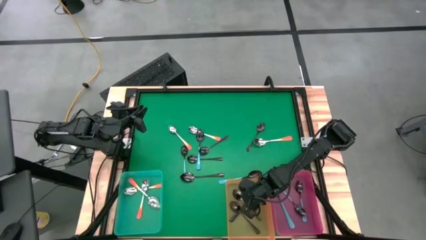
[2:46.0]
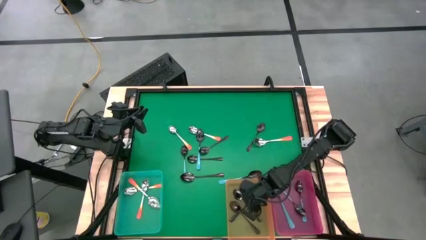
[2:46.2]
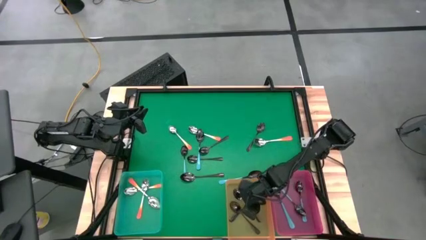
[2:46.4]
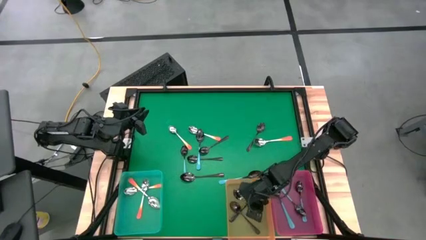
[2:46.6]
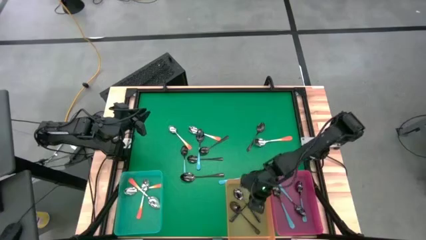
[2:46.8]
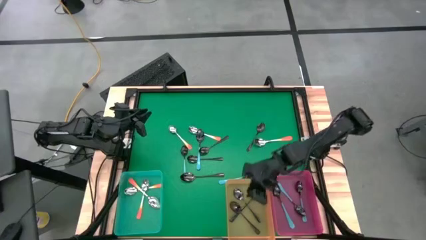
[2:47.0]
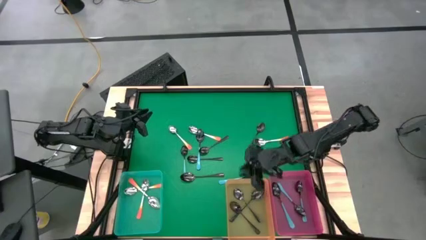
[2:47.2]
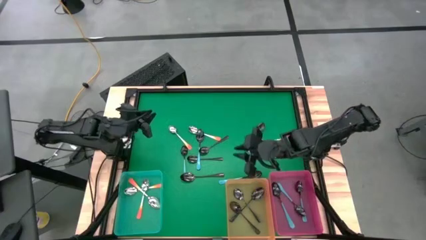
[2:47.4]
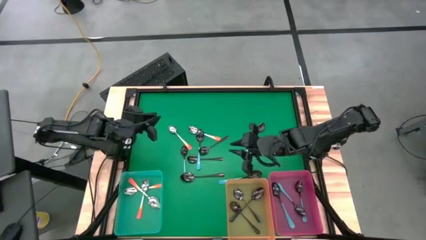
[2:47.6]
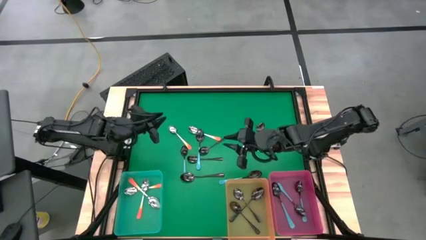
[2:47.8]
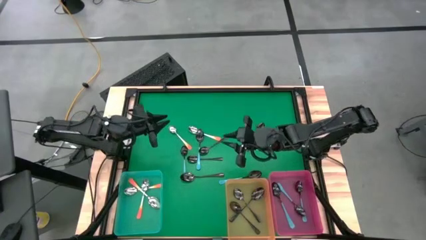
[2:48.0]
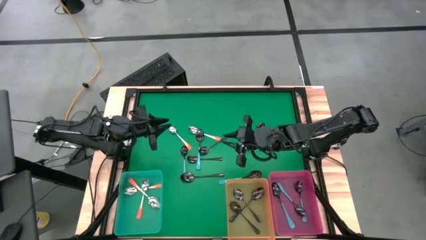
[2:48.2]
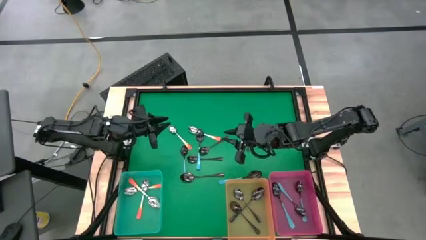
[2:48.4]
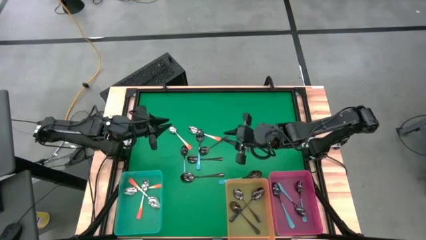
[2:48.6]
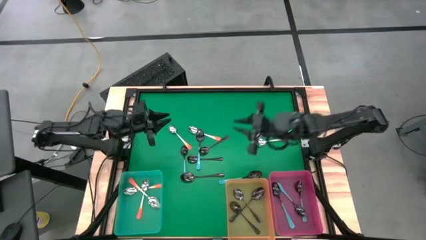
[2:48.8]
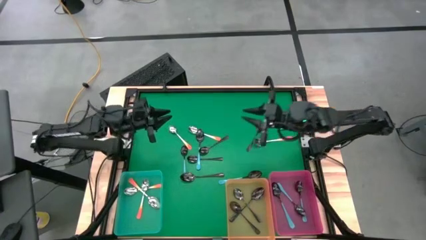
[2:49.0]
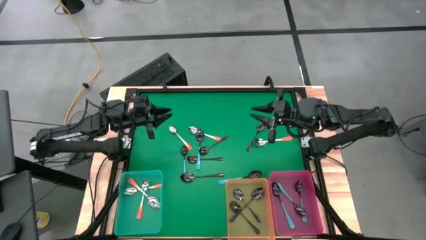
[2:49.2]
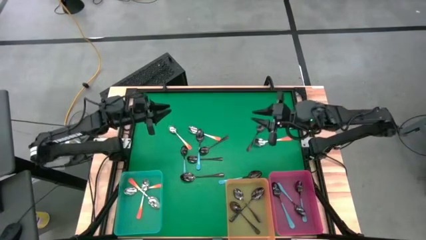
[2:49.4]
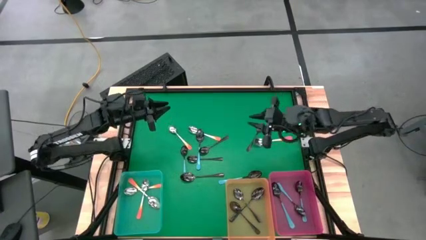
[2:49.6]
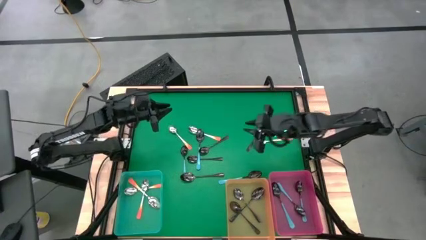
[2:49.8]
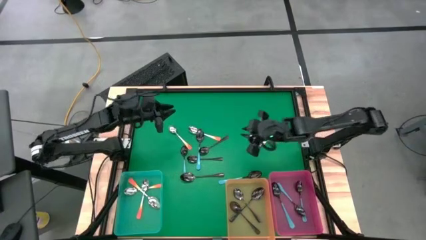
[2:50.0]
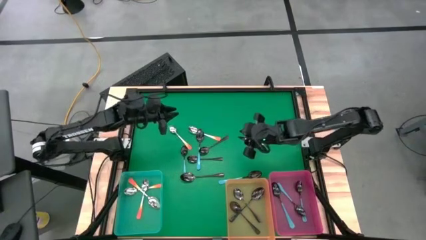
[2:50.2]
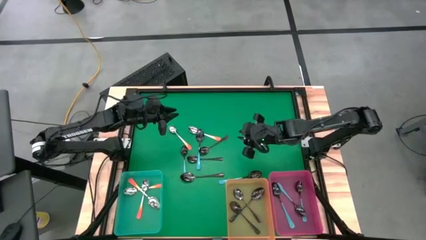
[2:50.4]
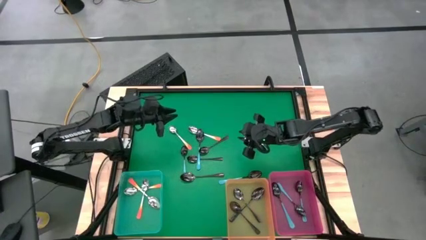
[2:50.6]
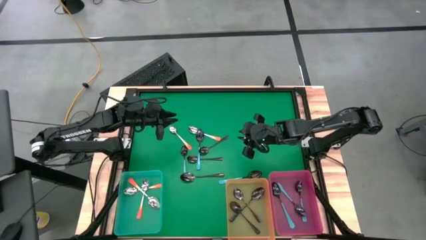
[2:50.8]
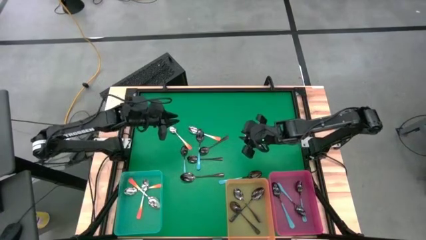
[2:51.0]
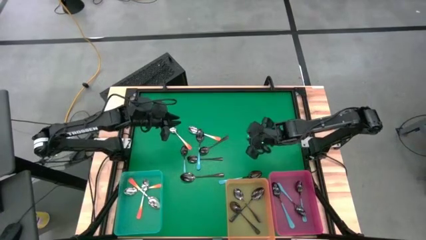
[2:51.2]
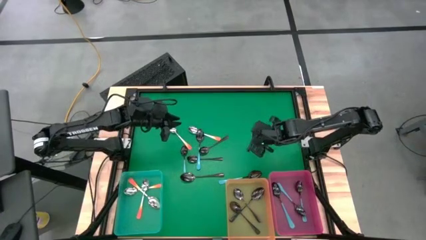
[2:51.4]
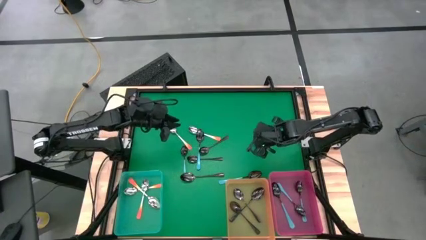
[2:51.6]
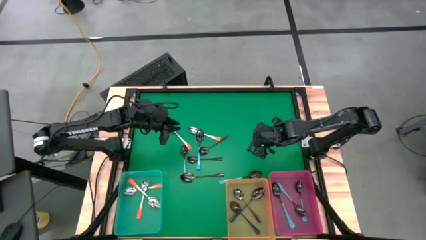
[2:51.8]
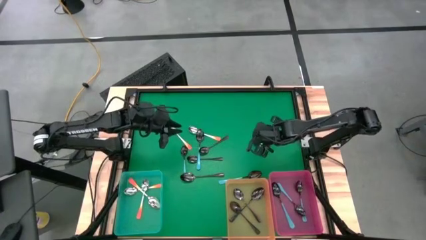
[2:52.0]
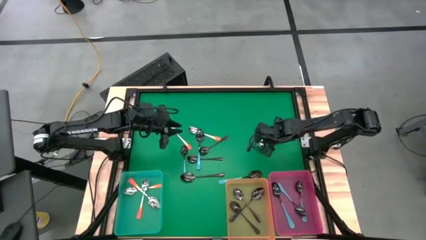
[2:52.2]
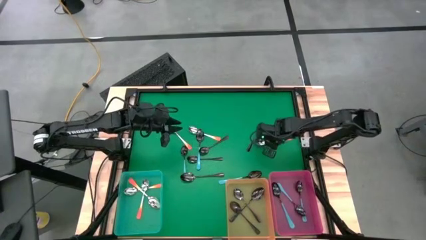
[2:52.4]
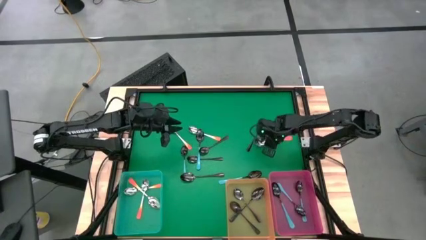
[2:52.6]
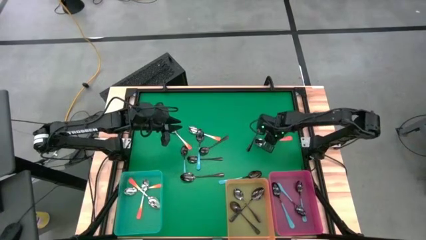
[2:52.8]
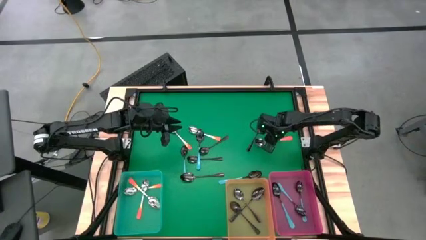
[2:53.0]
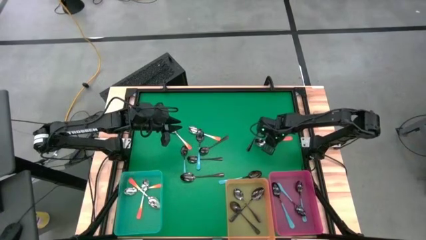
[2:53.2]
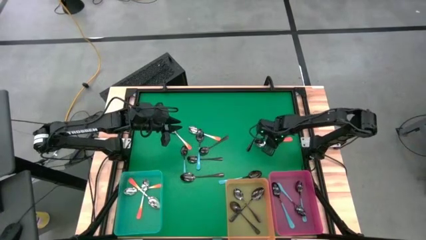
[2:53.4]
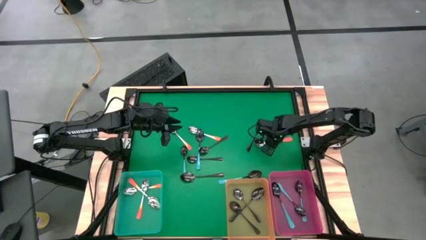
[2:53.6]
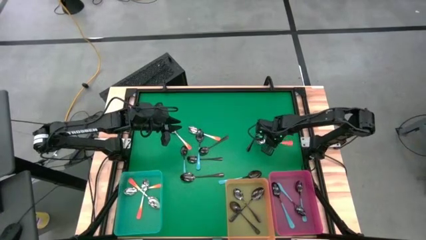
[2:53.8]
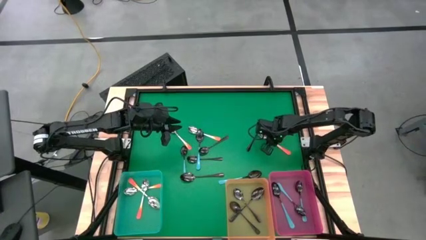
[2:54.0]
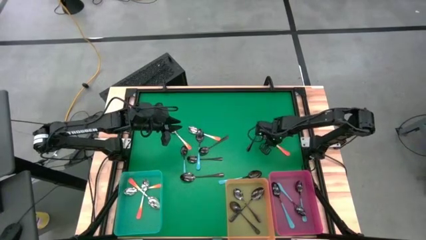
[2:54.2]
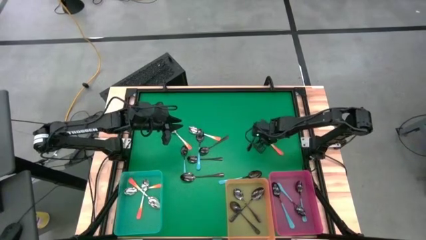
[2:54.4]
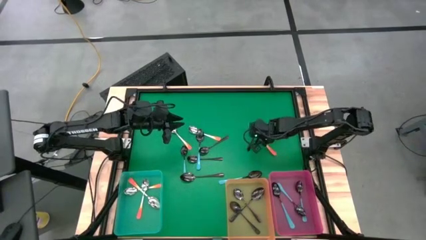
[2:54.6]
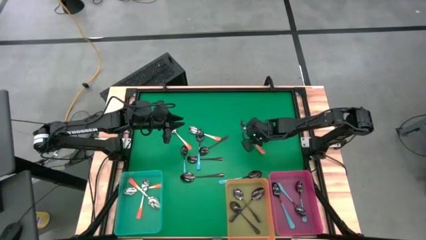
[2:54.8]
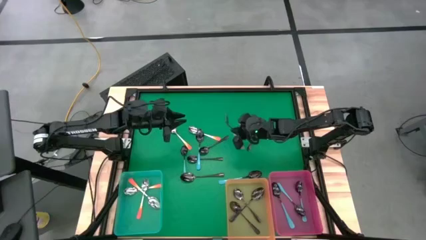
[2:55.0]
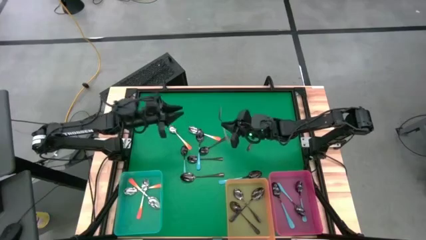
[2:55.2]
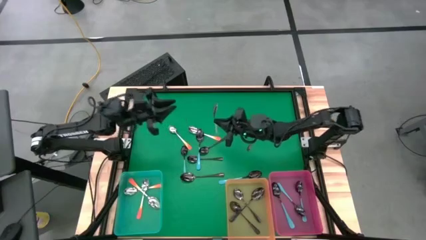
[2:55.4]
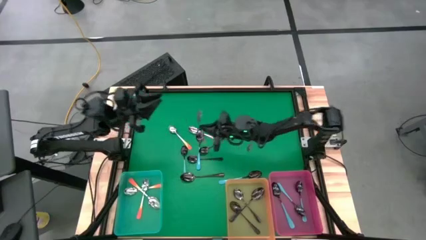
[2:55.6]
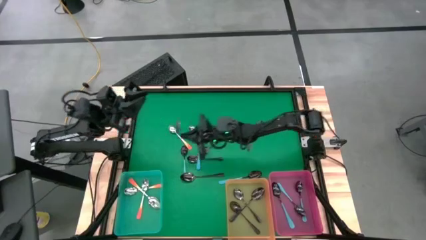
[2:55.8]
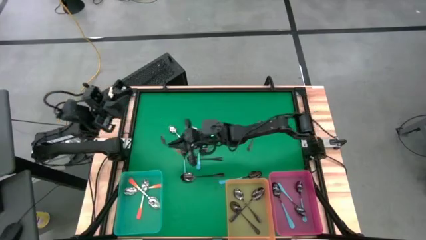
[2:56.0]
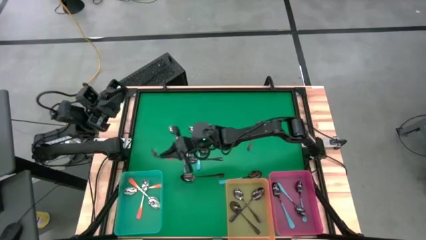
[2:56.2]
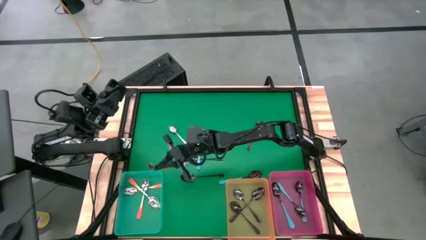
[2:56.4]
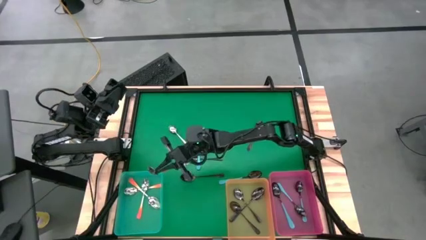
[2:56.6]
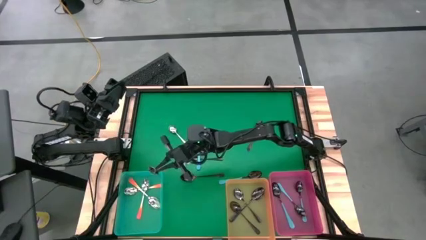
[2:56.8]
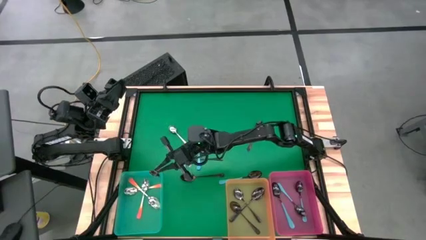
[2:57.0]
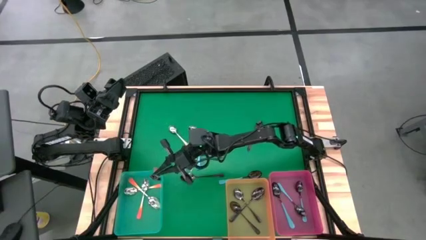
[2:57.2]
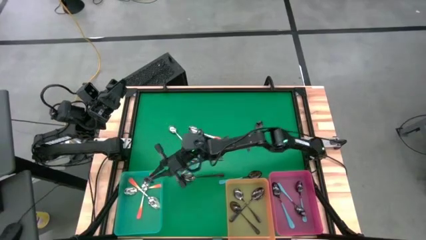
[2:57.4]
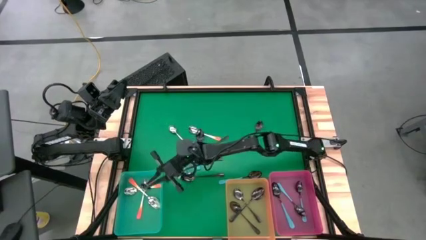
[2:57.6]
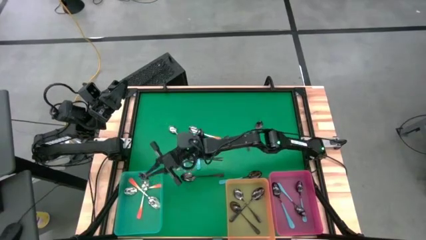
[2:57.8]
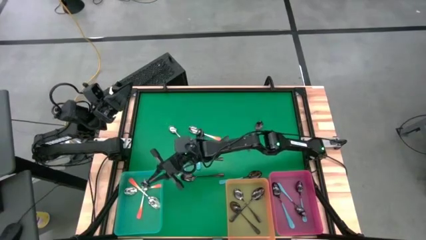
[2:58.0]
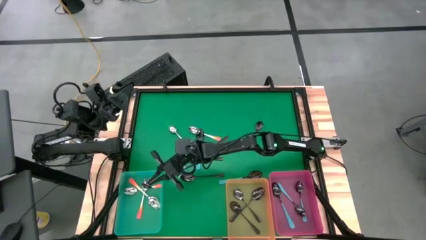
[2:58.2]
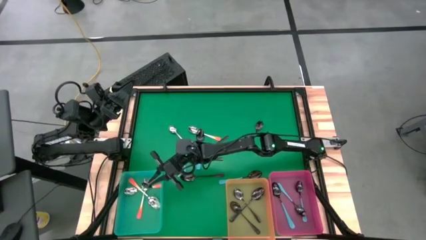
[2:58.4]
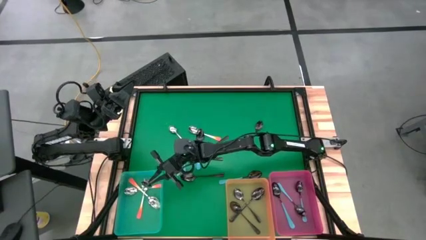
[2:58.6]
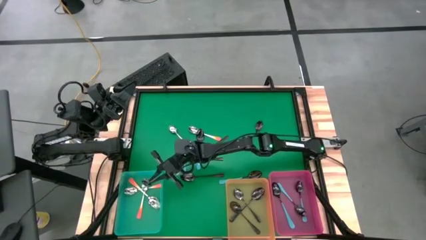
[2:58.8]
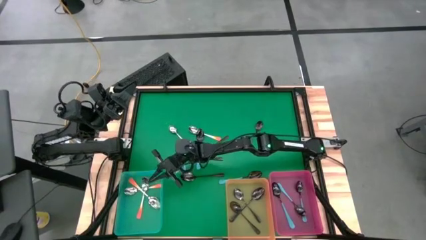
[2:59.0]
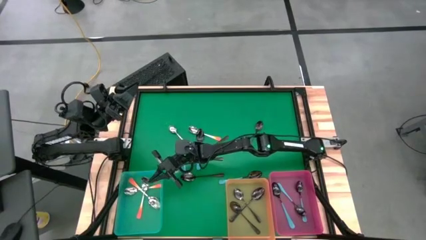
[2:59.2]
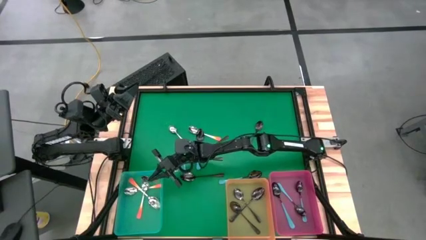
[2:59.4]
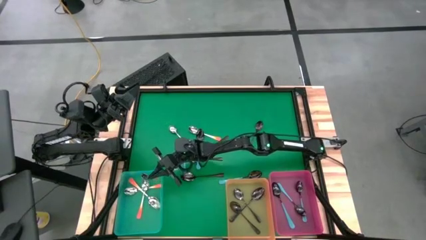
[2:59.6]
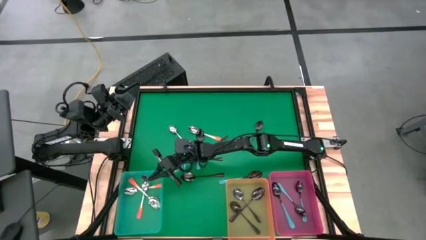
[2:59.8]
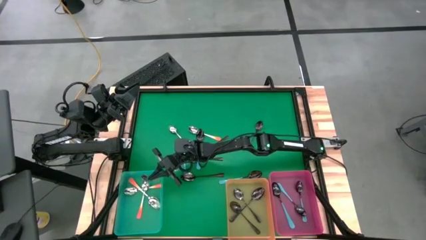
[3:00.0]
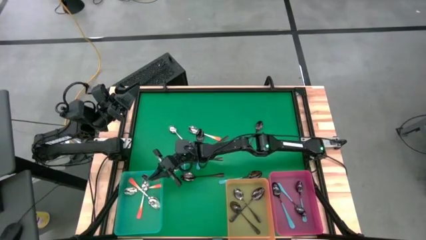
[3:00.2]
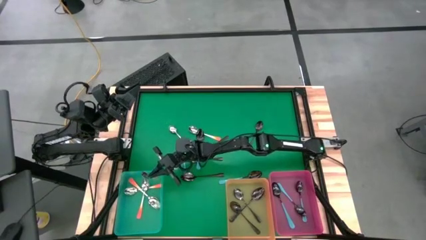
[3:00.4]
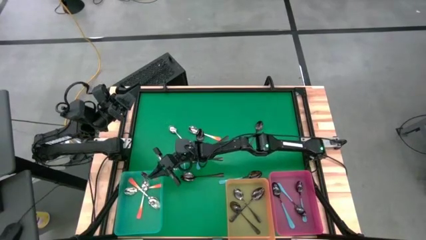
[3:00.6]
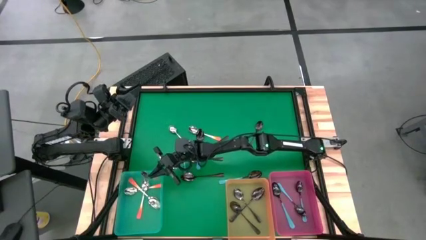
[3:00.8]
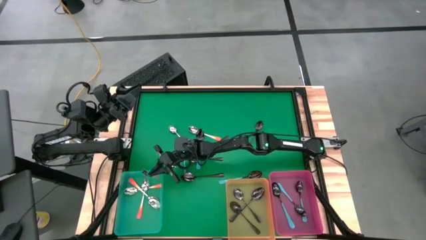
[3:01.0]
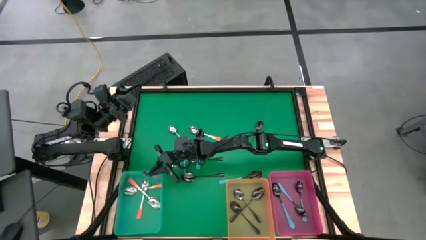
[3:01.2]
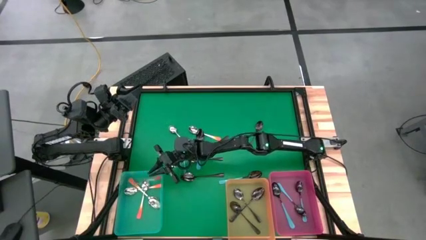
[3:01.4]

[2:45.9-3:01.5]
Task: Sort silverware by color (type)
Put the orange spoon into the green bin
